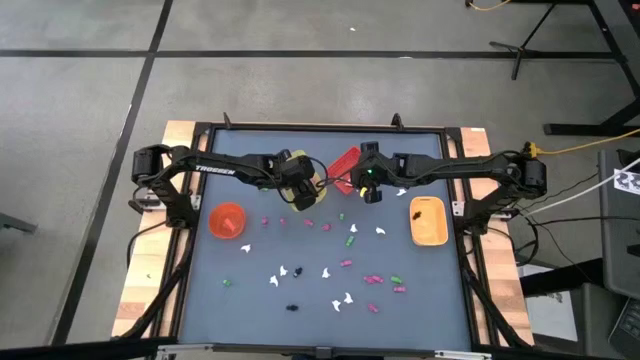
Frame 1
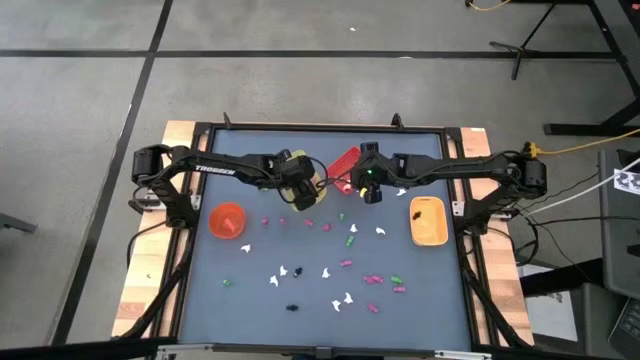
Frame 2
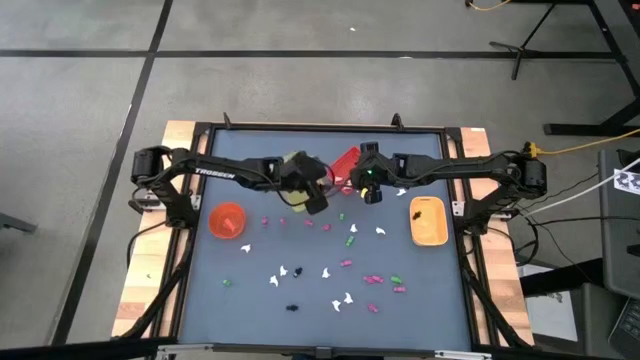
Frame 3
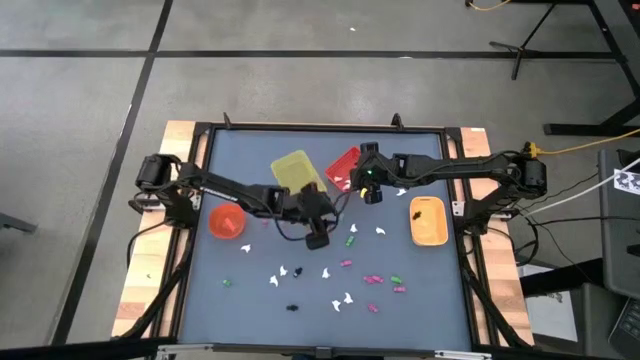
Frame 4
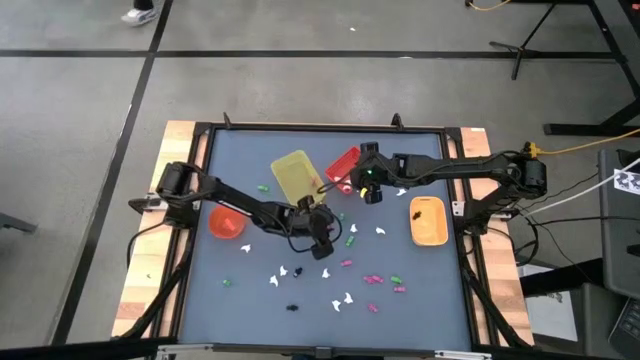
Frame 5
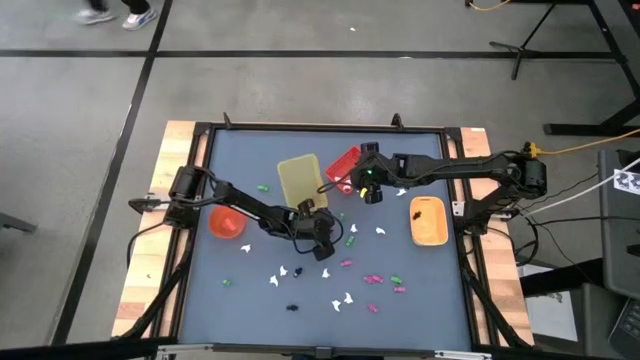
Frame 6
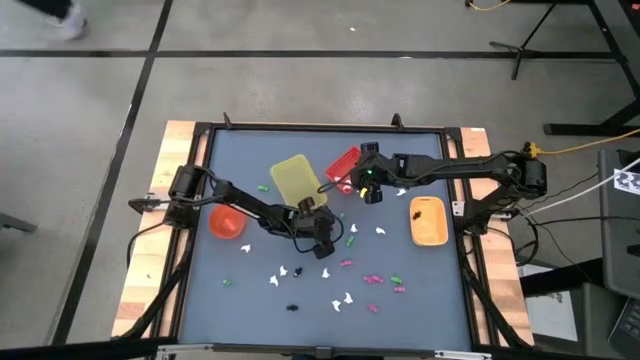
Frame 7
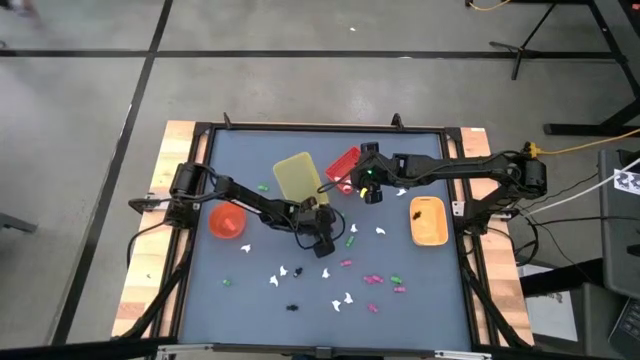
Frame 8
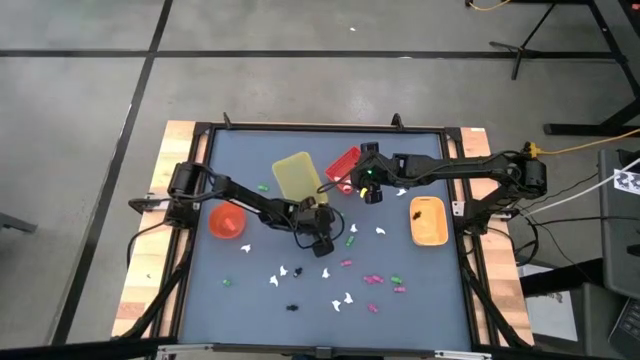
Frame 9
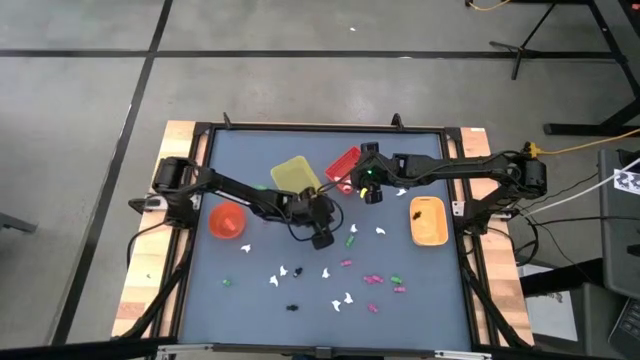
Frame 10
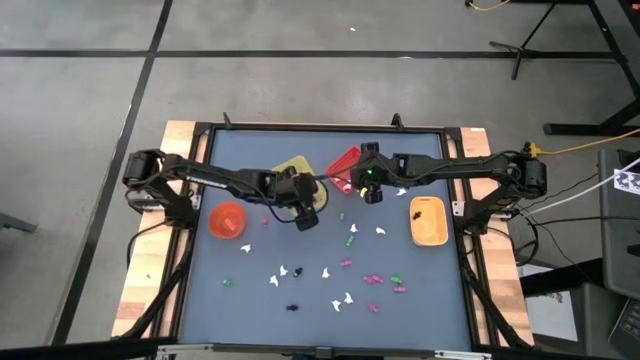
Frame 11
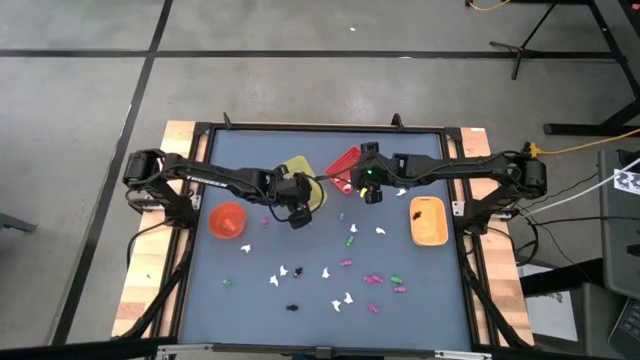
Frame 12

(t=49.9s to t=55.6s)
Task: Sort Halloween decoration
Put the pink skeleton toy into the yellow bin

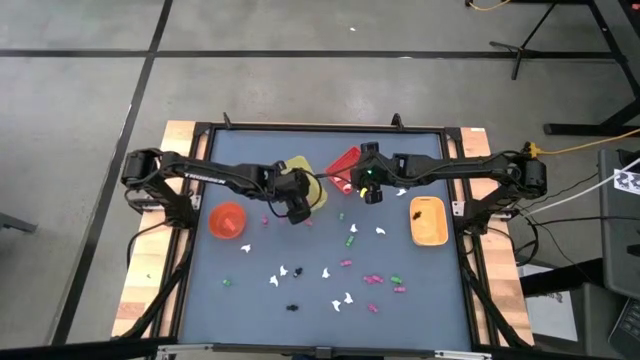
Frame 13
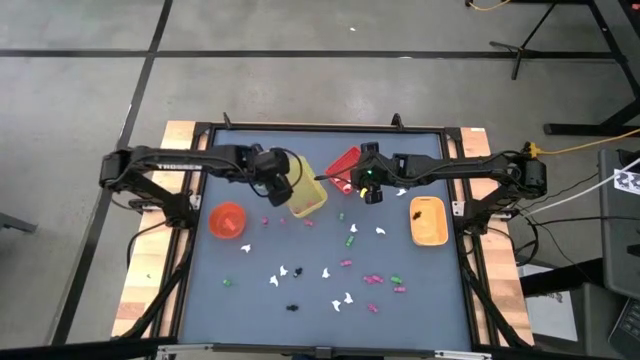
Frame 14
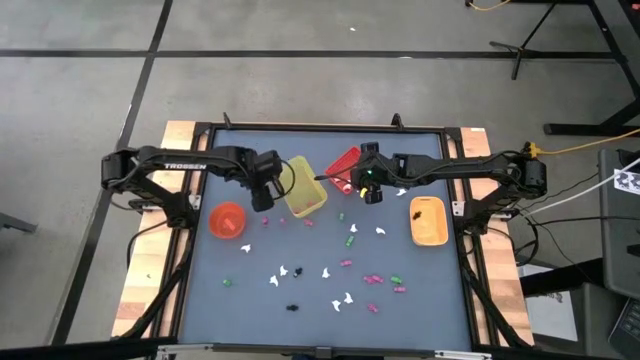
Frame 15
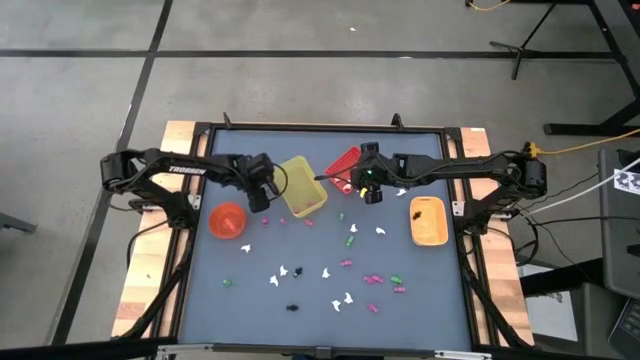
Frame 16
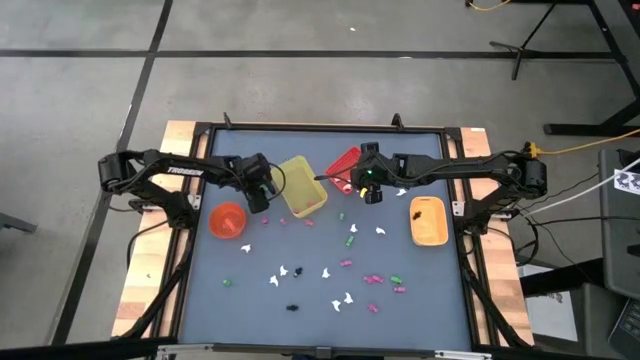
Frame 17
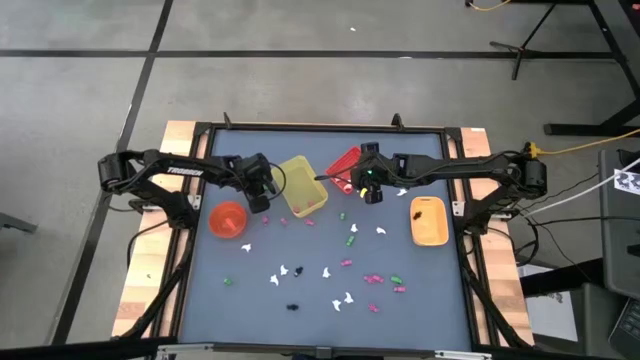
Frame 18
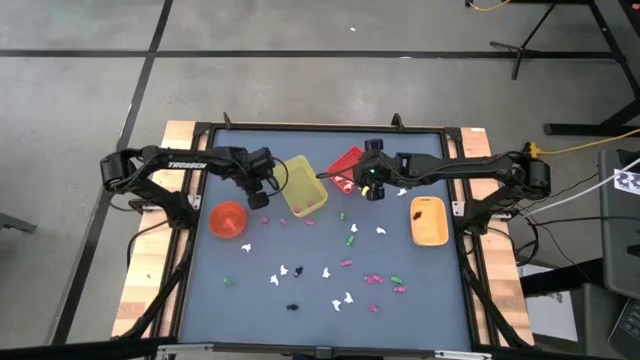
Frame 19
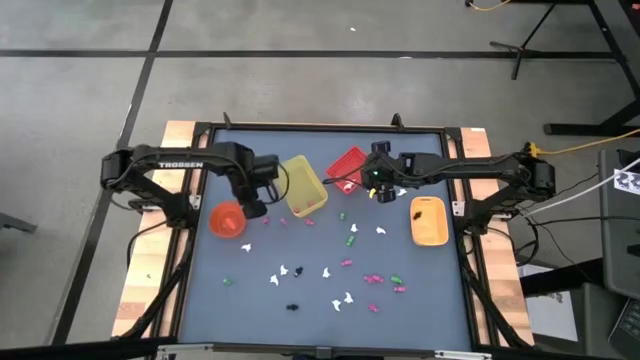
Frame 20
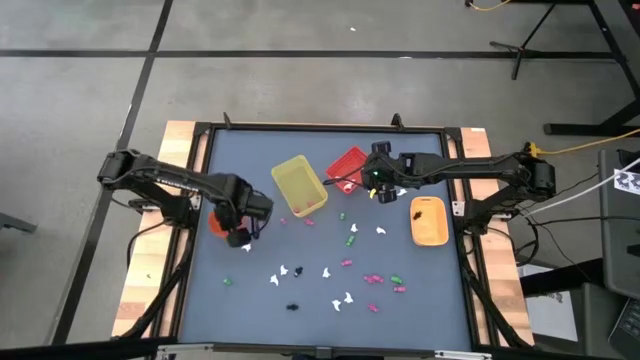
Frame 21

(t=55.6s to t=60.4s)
Put the green skeleton toy into the orange bin

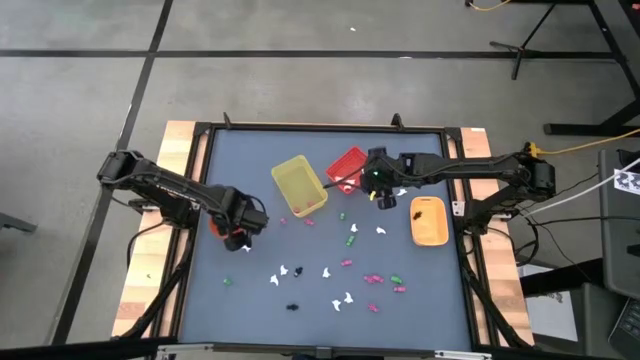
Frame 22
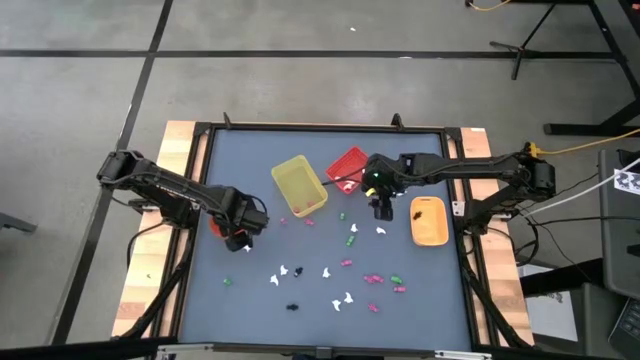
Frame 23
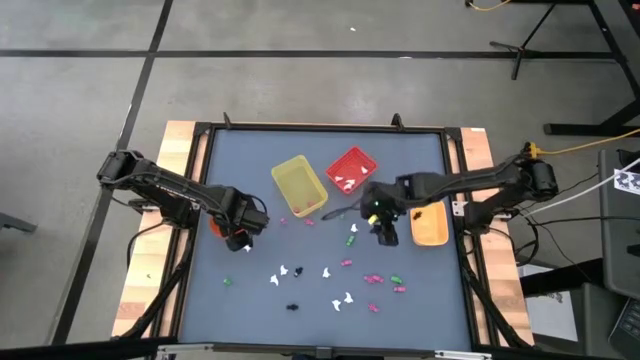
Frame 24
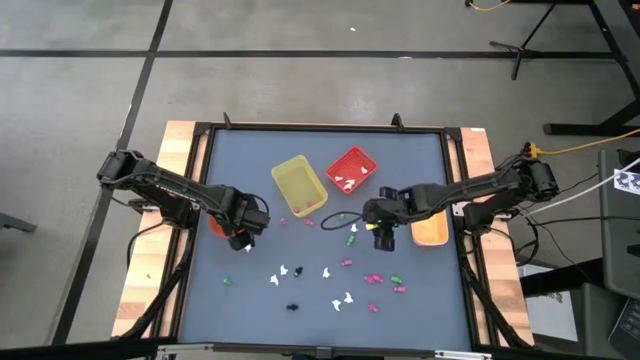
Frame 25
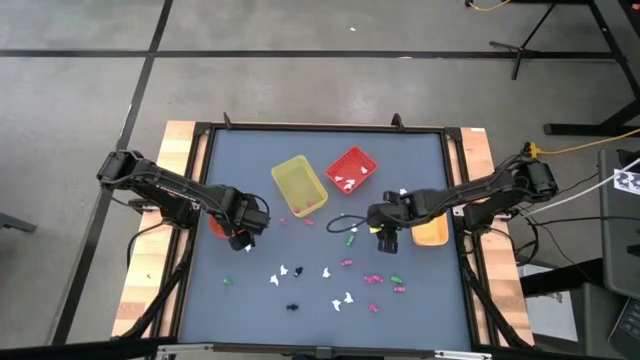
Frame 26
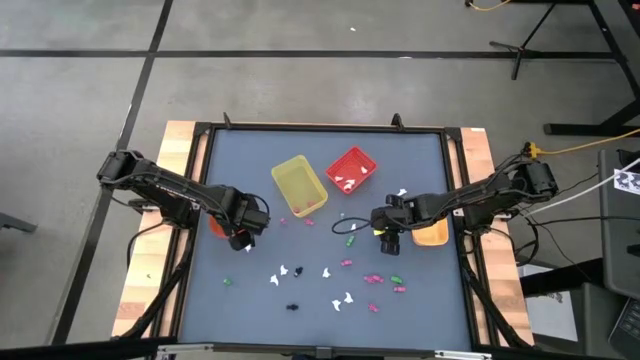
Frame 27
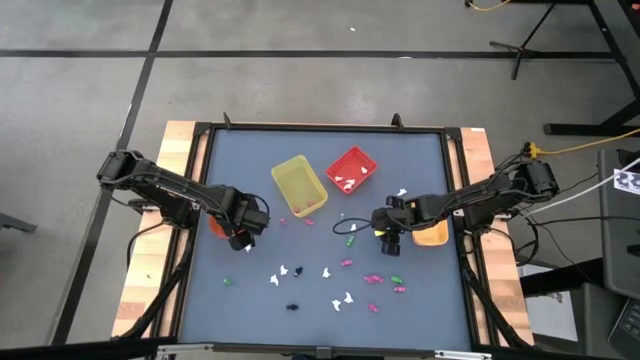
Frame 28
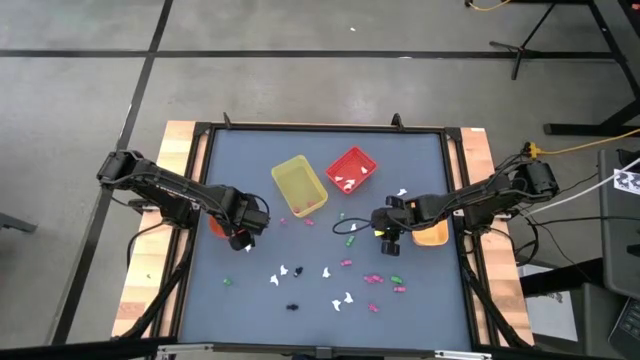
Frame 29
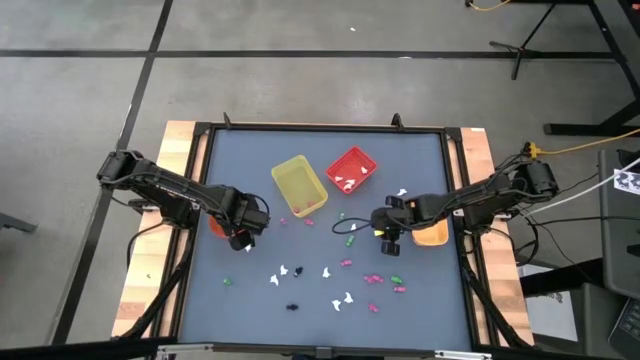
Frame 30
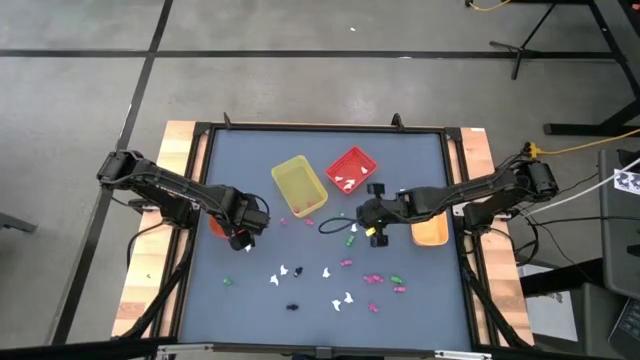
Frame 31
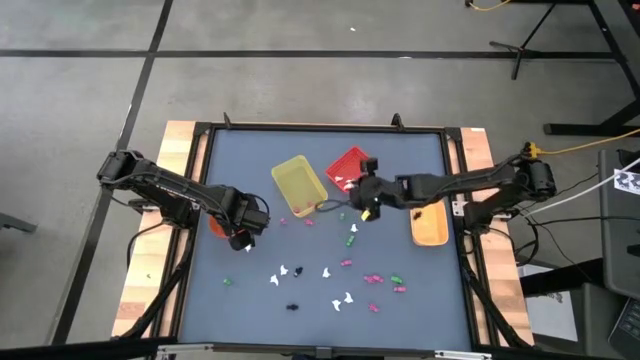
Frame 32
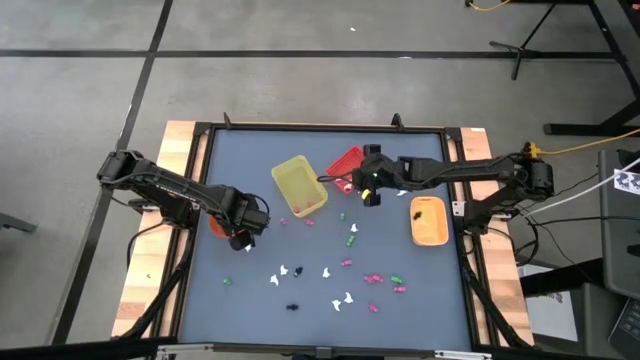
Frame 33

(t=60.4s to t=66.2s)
Put the white ghost toy into the red bin

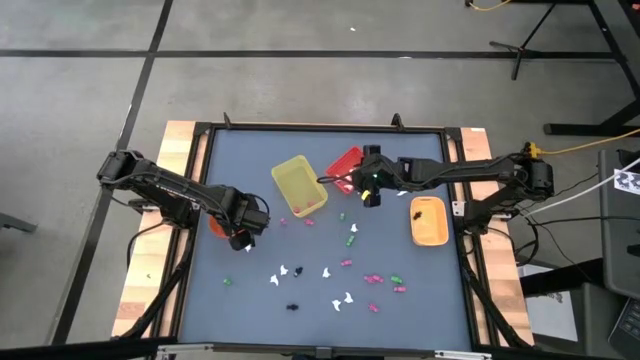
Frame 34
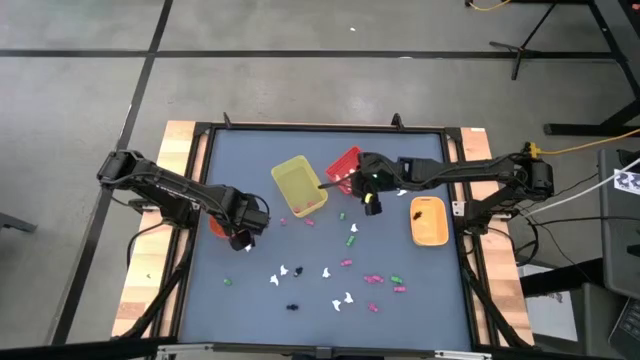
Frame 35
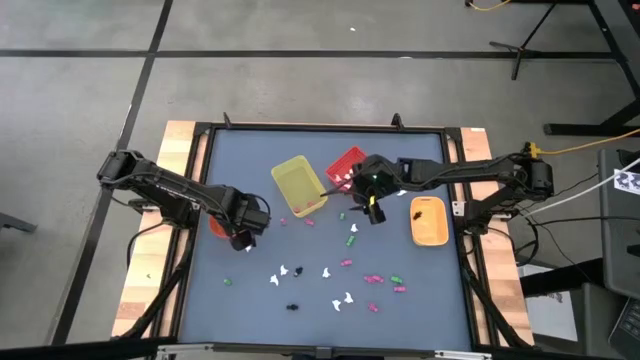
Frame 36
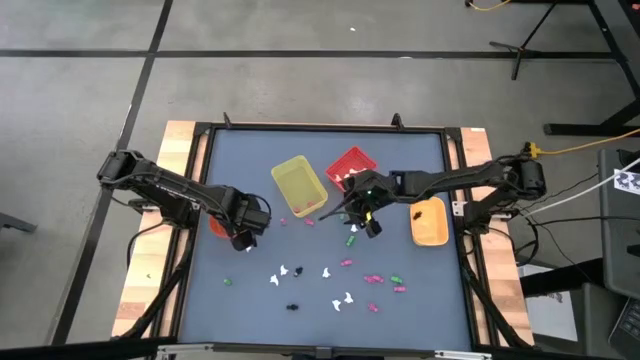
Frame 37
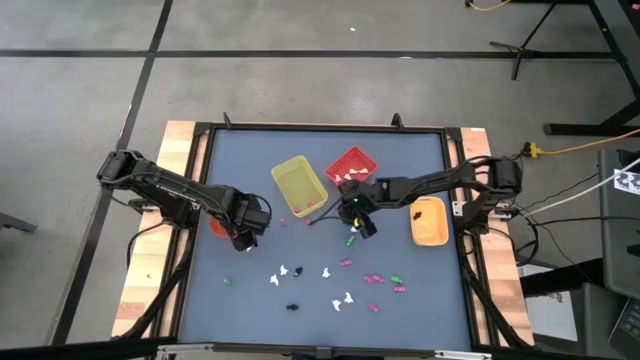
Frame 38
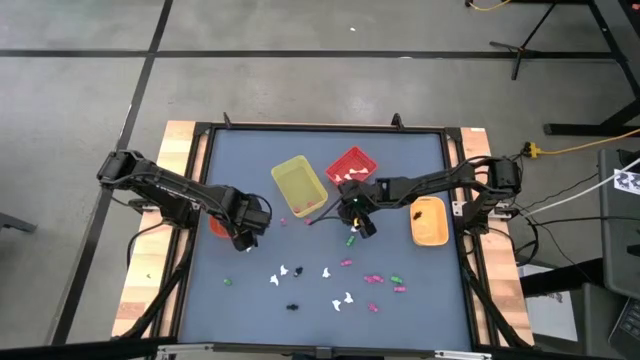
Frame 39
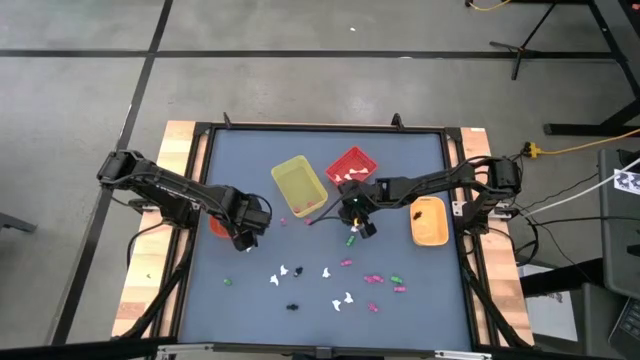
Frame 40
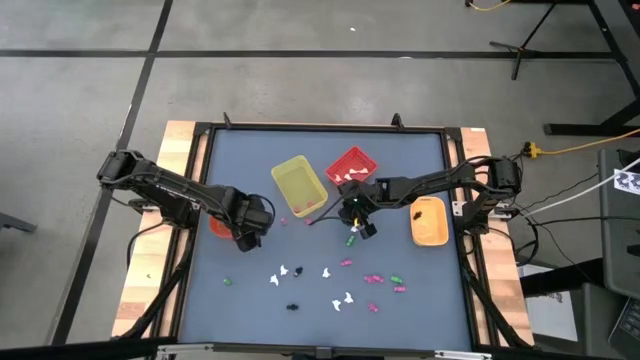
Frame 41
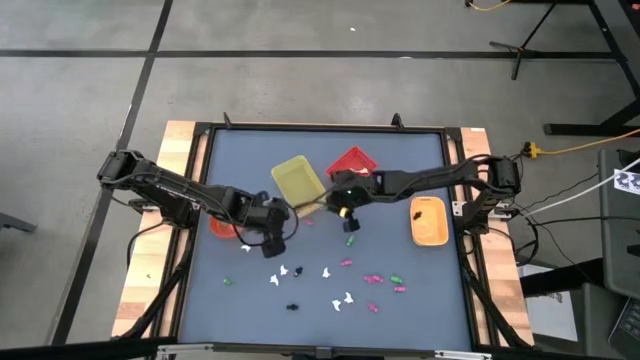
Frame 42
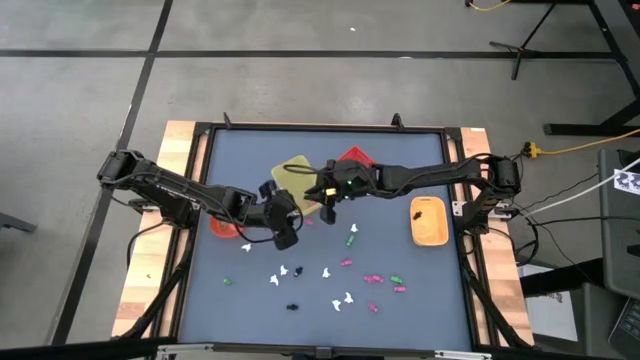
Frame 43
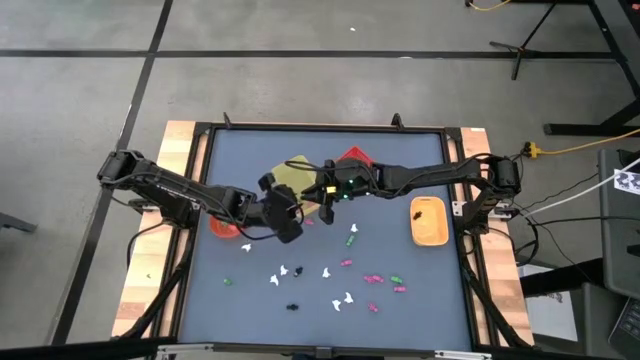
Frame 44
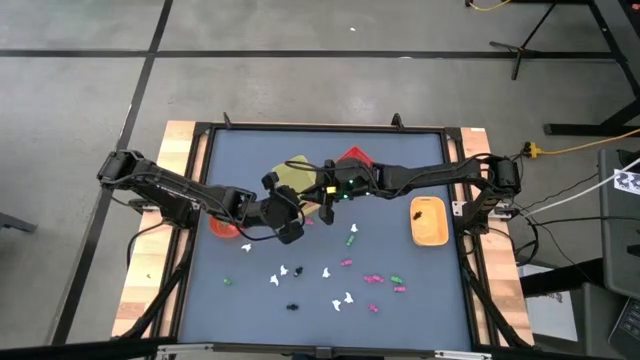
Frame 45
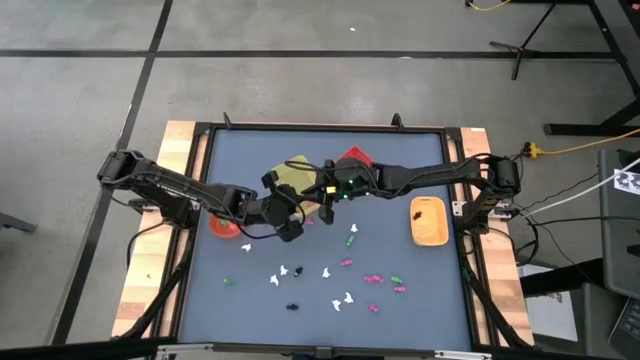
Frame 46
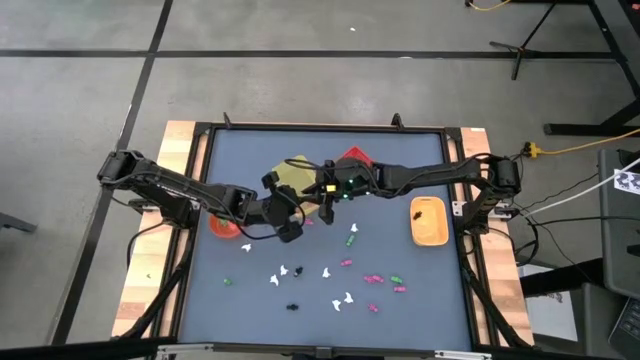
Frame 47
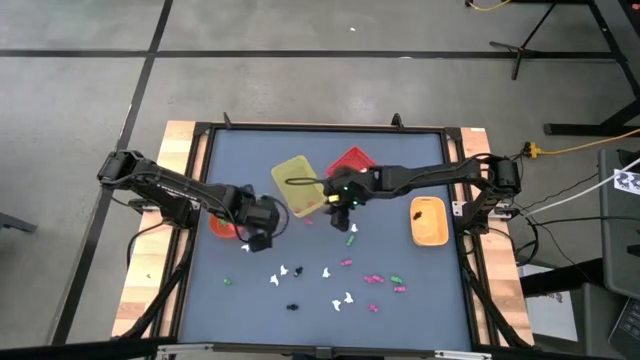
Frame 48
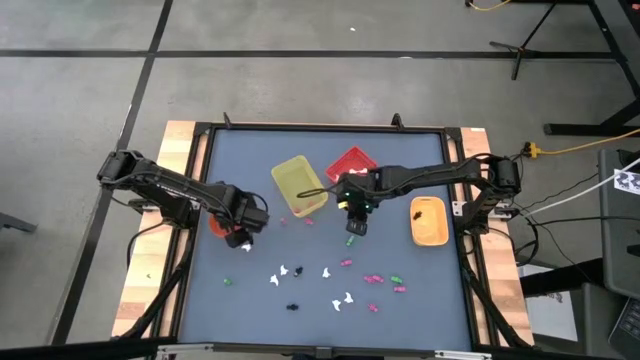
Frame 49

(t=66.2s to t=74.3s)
Put the green skeleton toy into the orange bin
